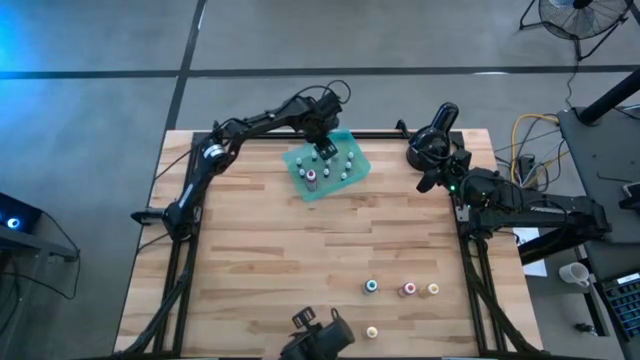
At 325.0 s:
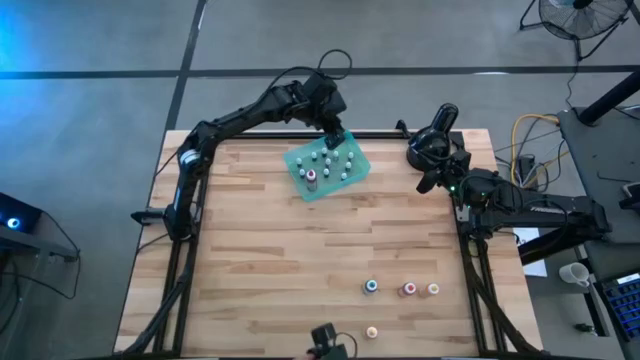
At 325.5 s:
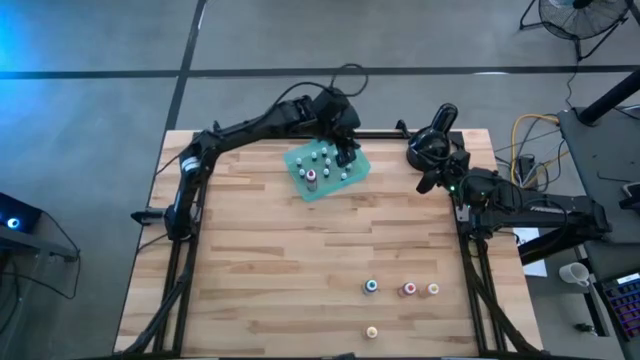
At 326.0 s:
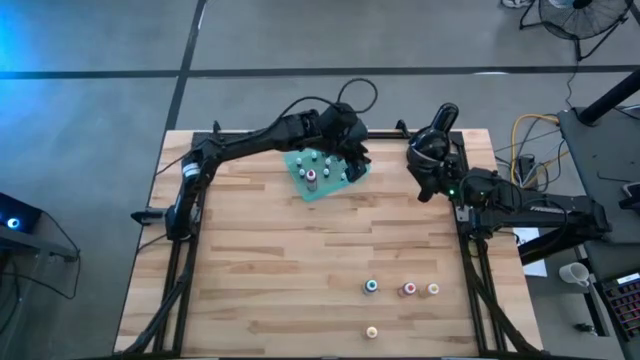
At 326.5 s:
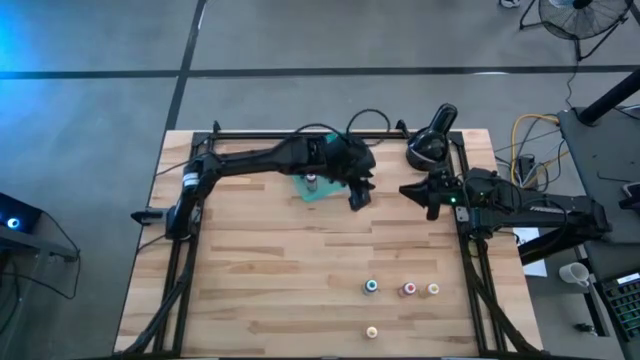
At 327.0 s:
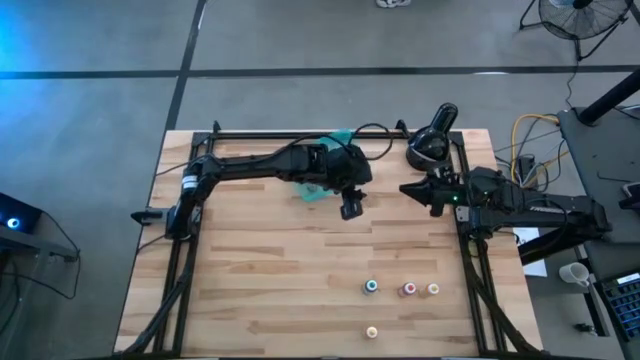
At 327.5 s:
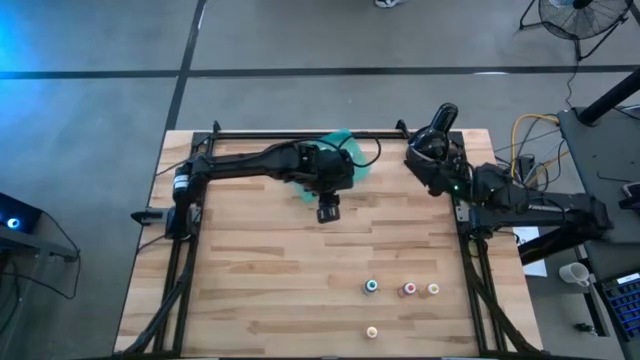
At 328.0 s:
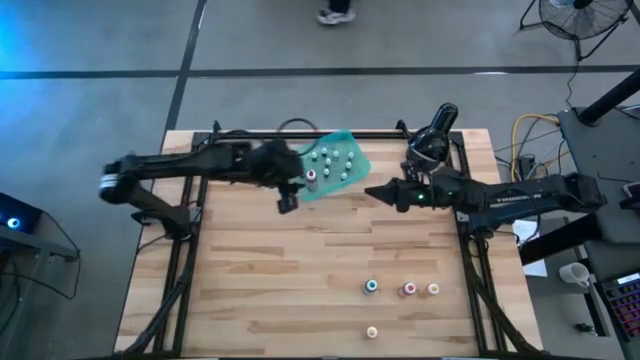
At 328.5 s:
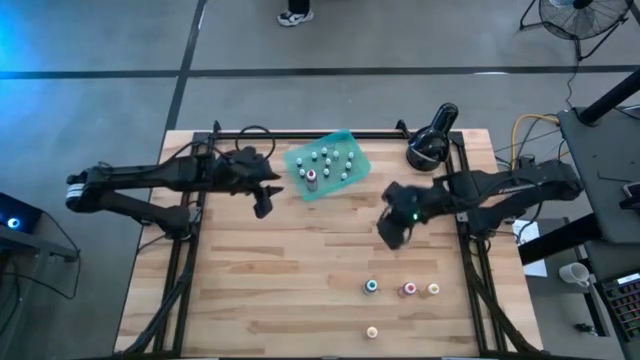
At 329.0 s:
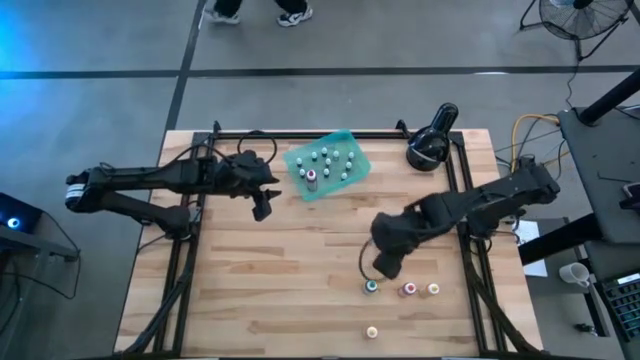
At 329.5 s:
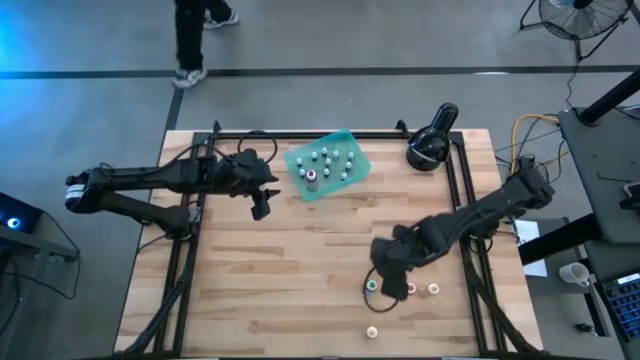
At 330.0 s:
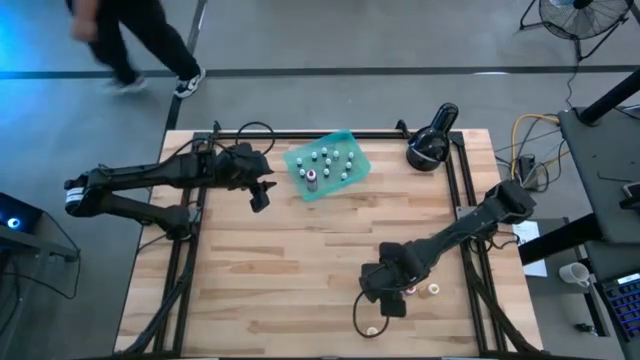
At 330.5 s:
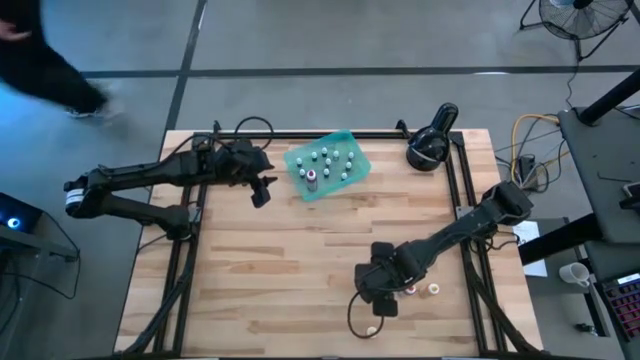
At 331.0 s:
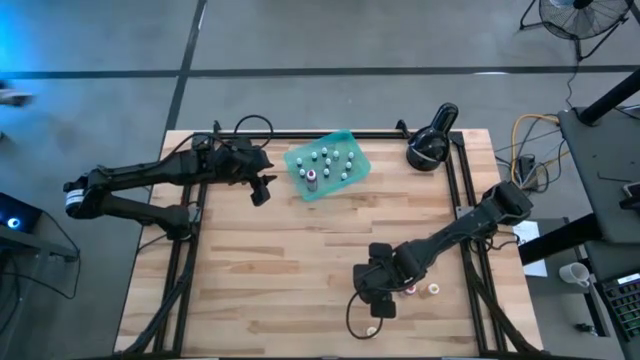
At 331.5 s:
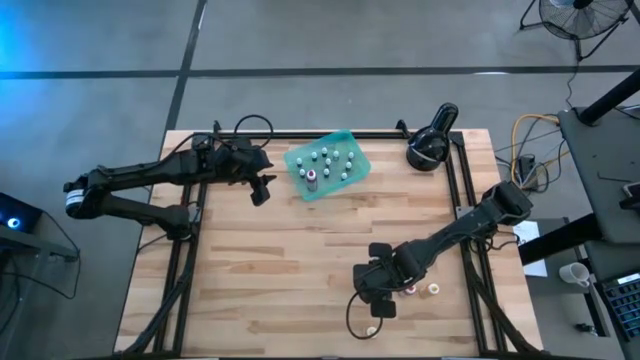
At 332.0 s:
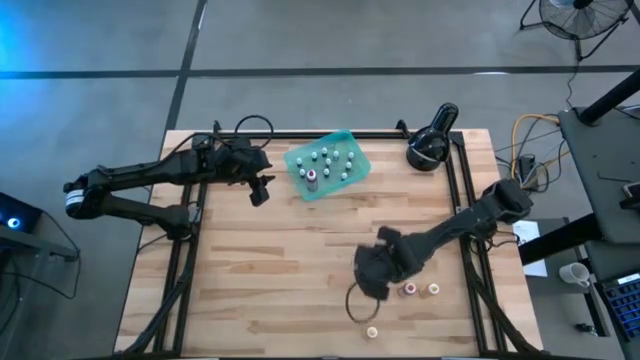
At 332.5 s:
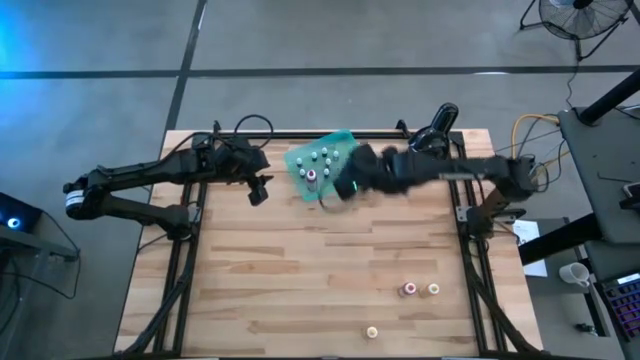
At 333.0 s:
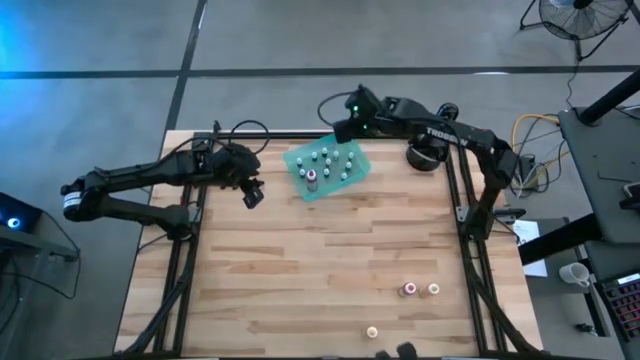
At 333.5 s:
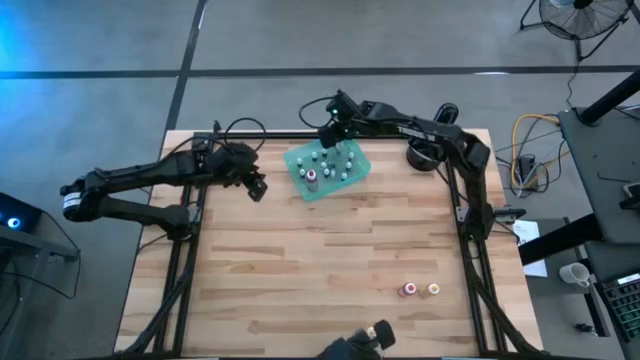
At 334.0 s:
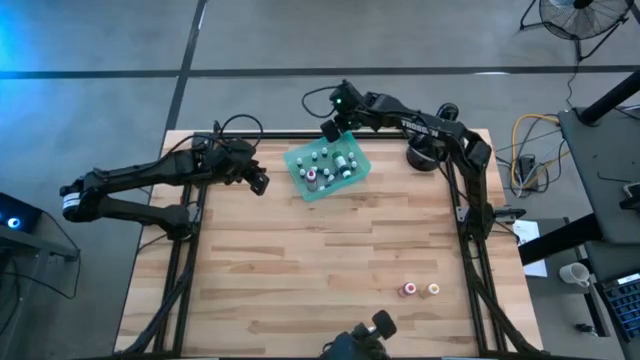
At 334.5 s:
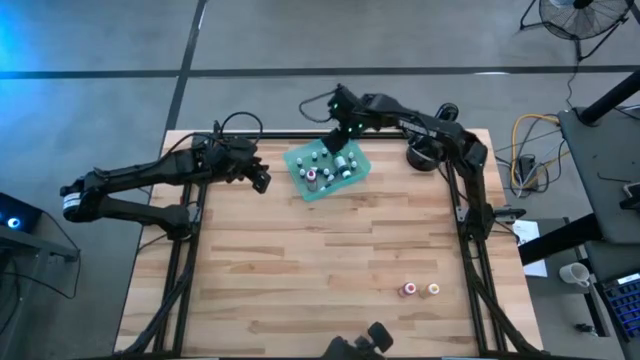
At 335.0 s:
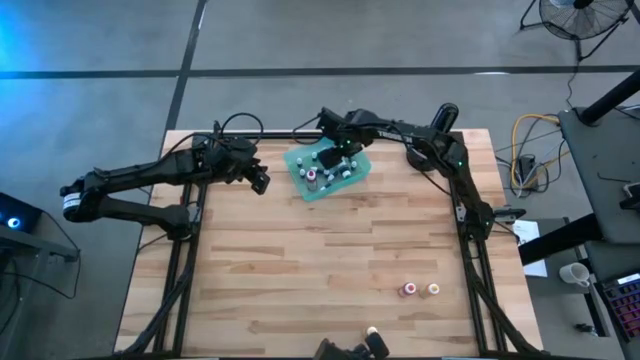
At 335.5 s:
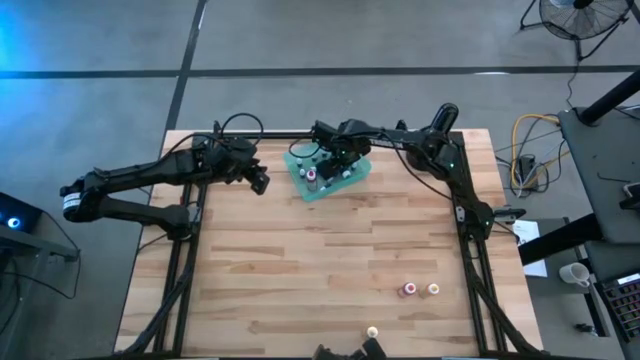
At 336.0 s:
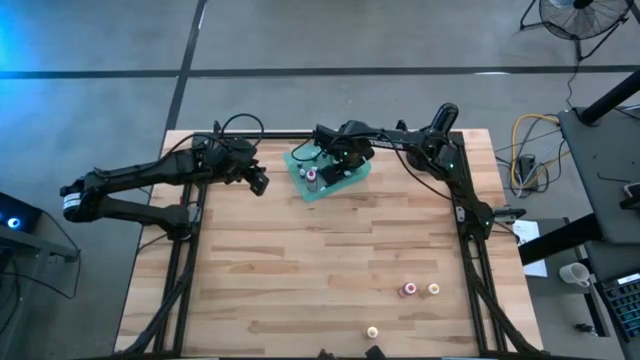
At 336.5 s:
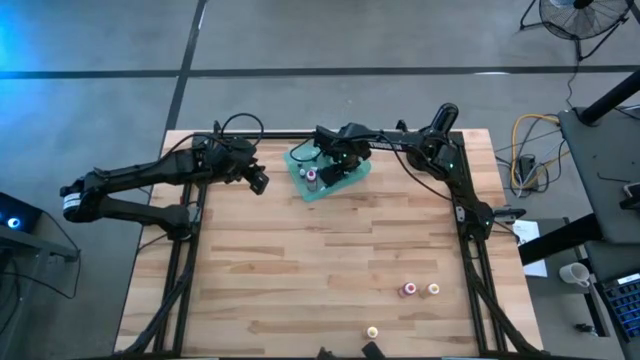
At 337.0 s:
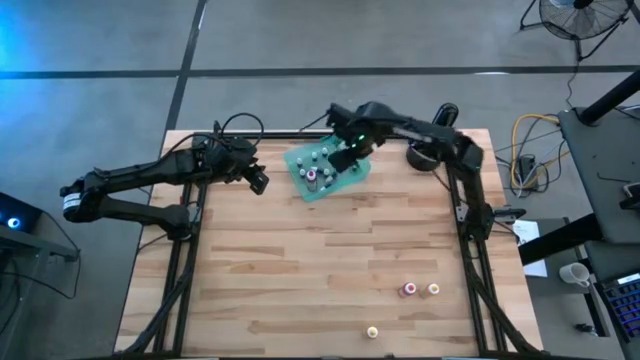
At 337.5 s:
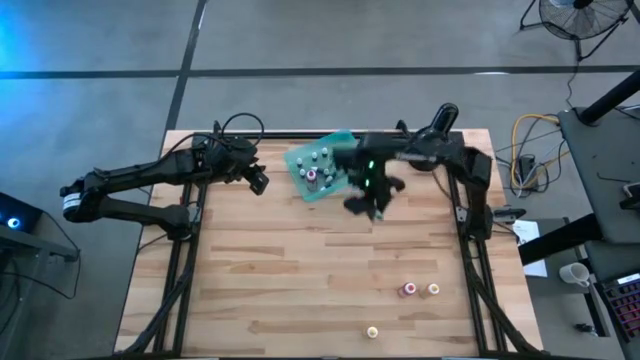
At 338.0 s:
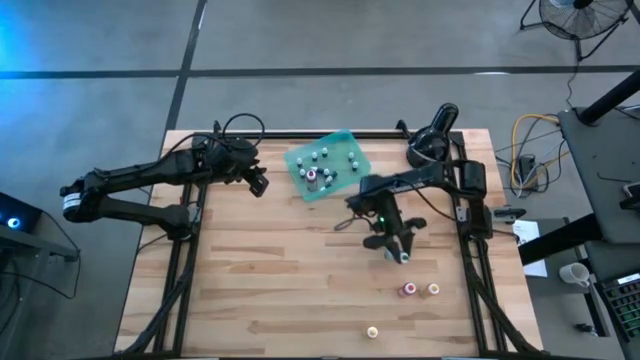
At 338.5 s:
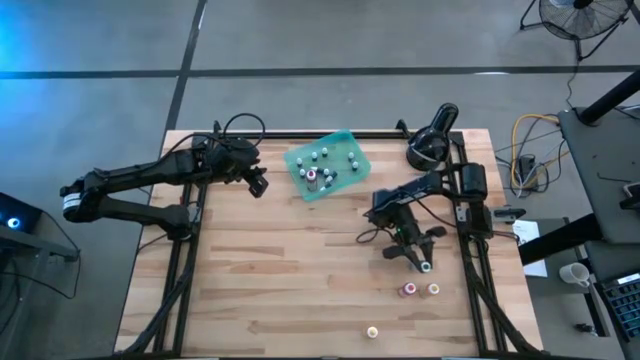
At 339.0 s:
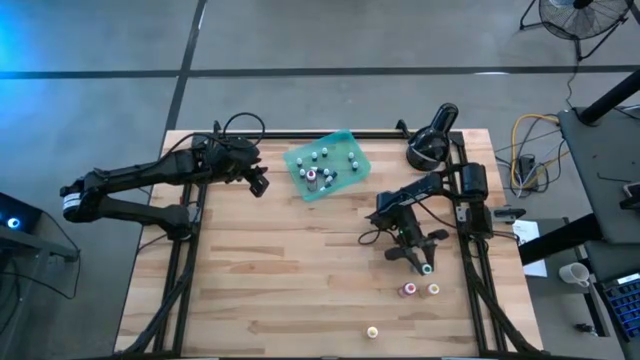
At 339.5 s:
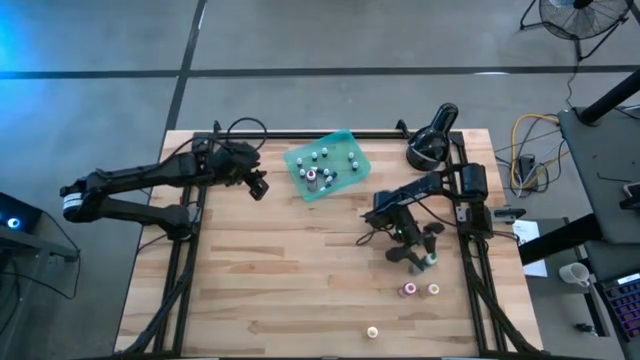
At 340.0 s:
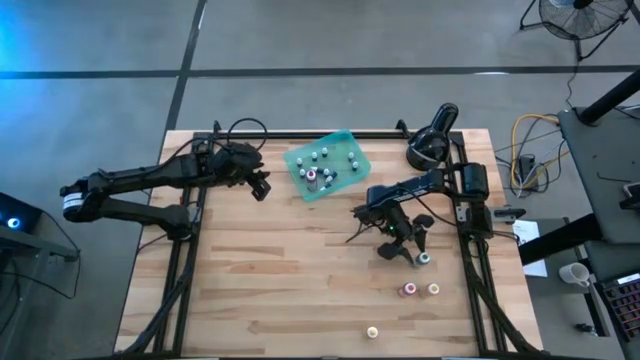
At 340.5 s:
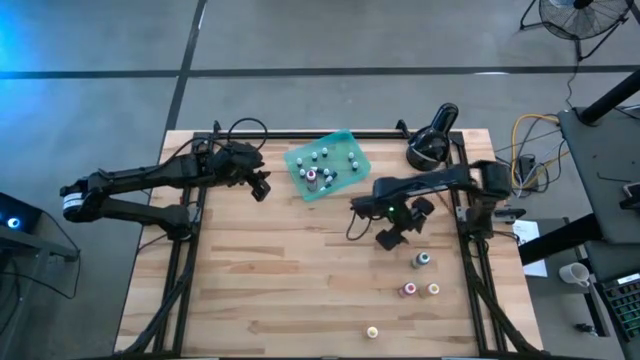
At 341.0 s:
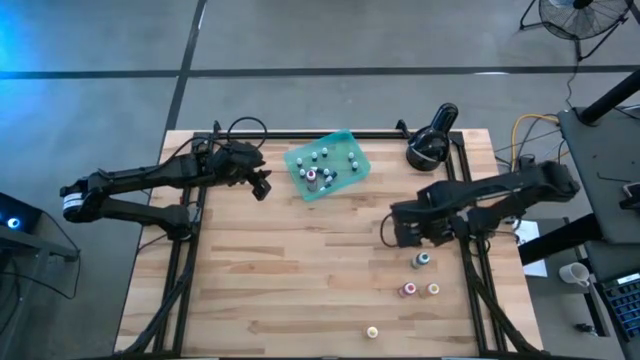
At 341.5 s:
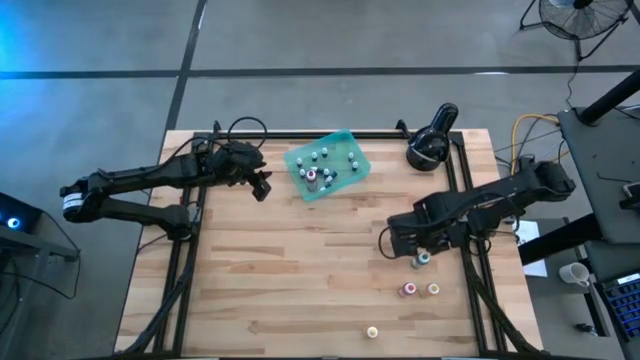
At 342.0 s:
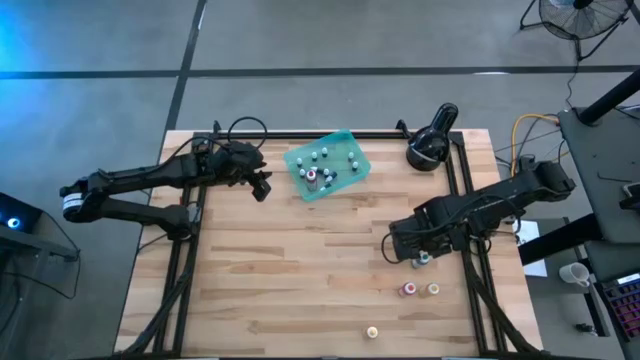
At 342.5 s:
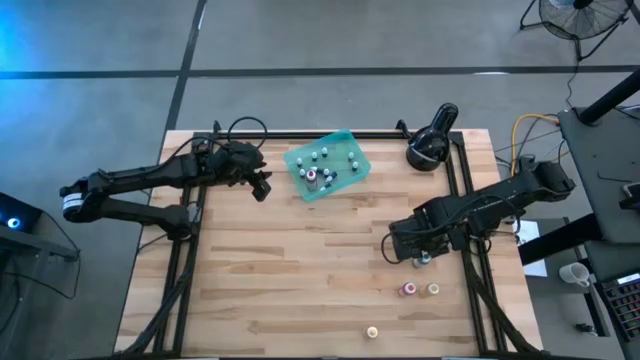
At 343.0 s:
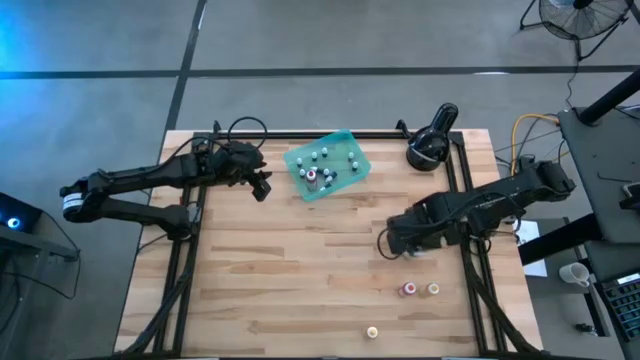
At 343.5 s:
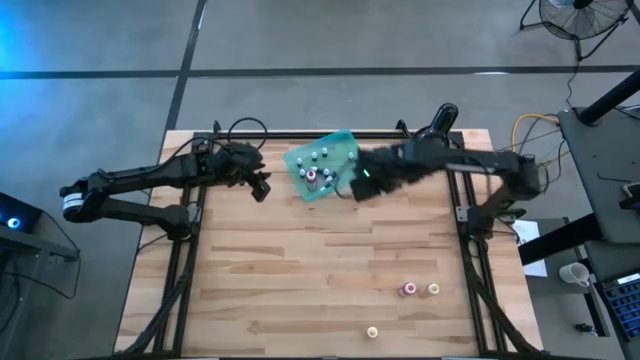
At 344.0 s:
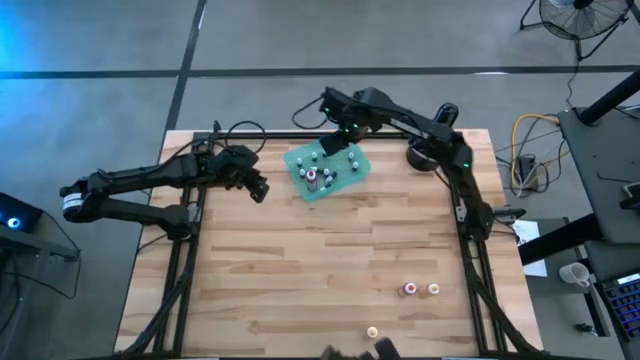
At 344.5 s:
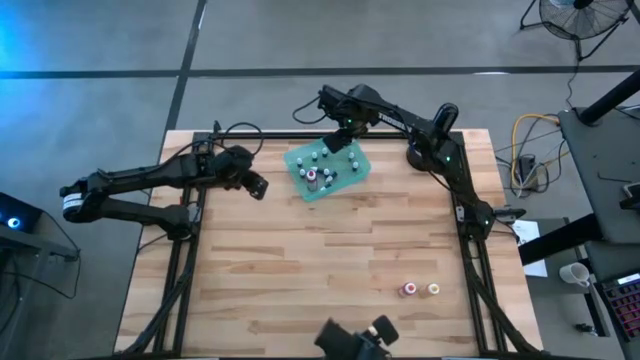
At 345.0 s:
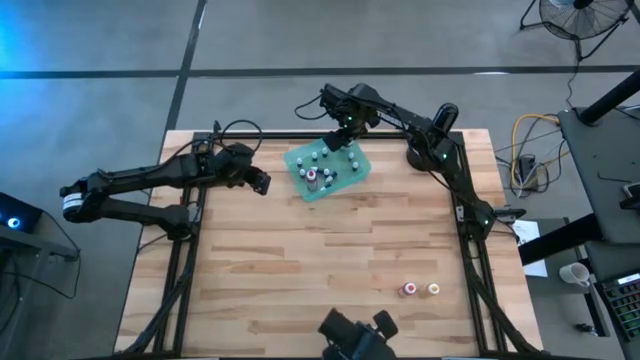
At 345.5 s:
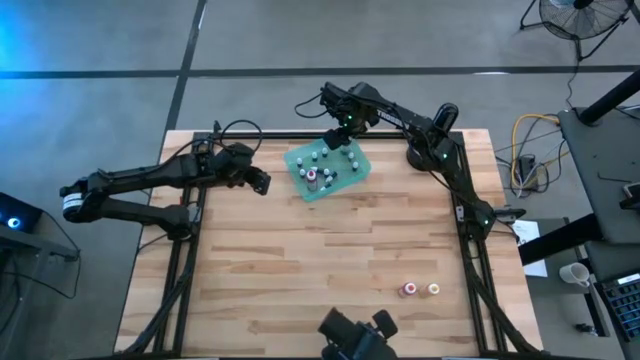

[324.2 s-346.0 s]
Task: Pick & Place food coloring
Put the black small food coloring into the green bin
